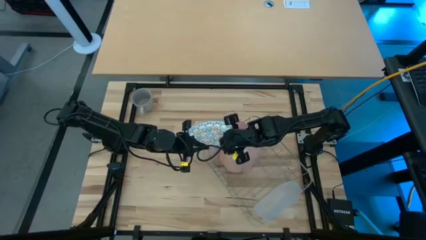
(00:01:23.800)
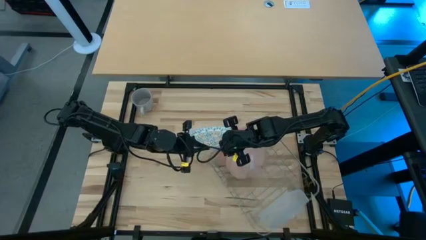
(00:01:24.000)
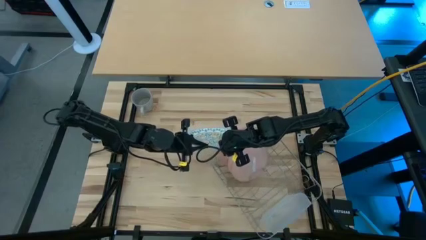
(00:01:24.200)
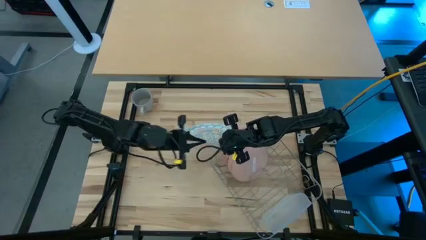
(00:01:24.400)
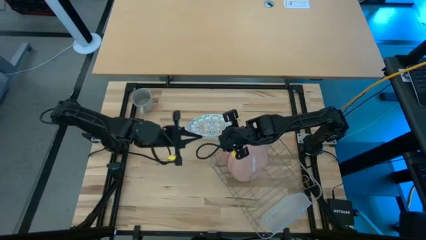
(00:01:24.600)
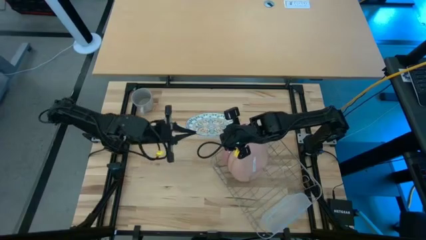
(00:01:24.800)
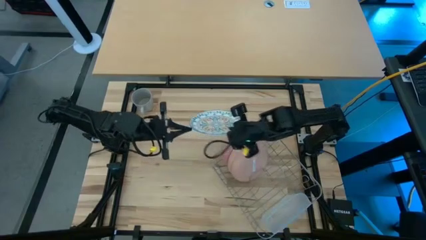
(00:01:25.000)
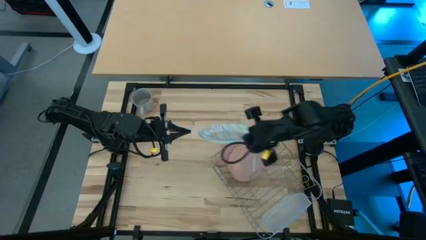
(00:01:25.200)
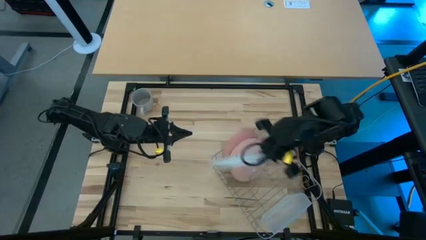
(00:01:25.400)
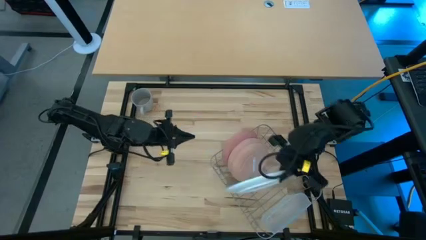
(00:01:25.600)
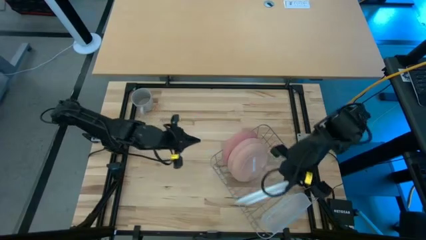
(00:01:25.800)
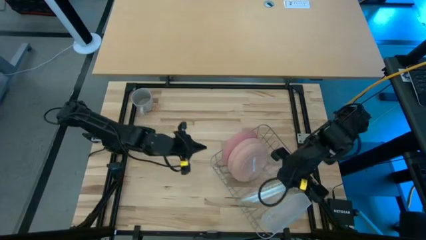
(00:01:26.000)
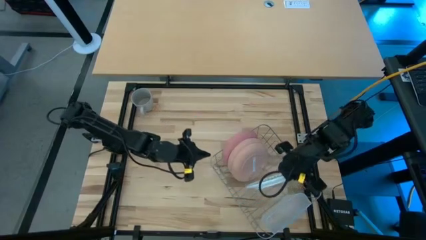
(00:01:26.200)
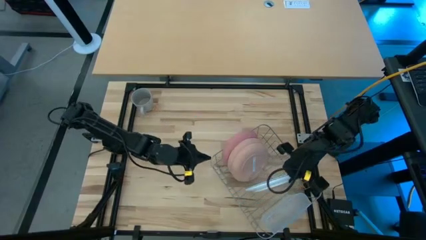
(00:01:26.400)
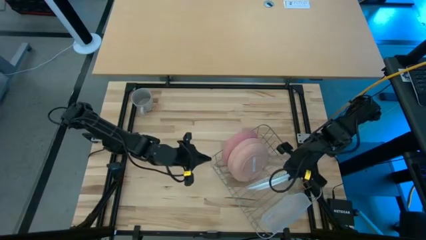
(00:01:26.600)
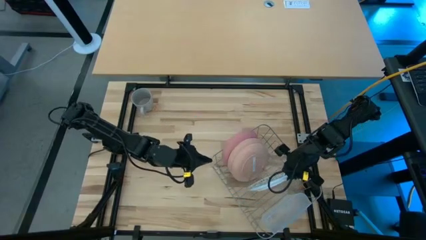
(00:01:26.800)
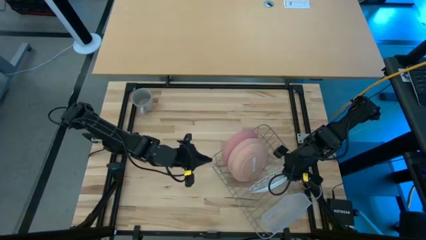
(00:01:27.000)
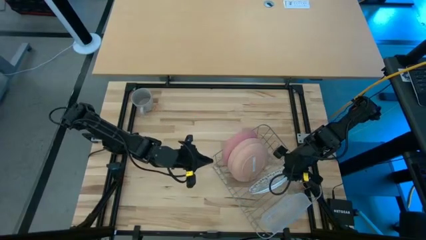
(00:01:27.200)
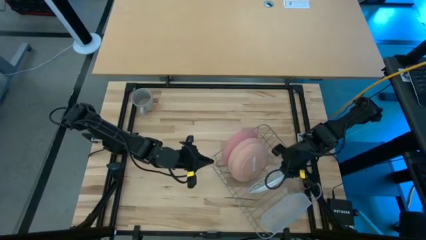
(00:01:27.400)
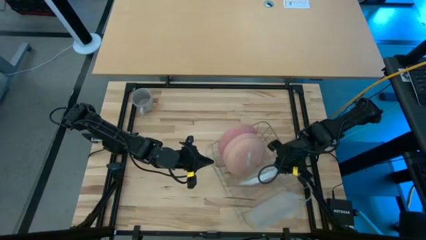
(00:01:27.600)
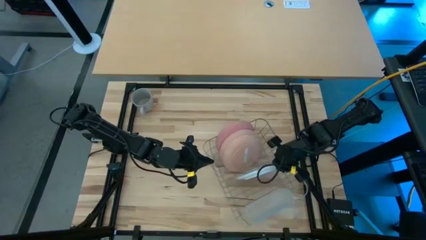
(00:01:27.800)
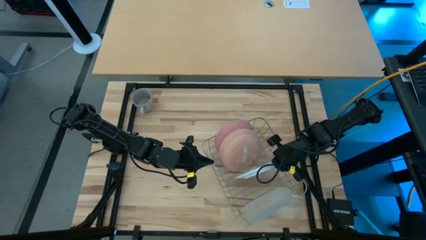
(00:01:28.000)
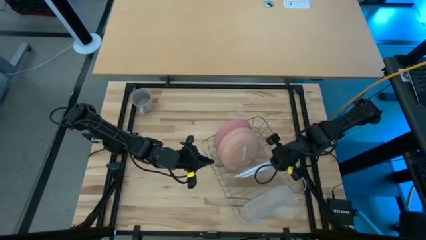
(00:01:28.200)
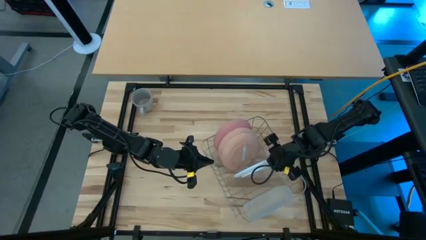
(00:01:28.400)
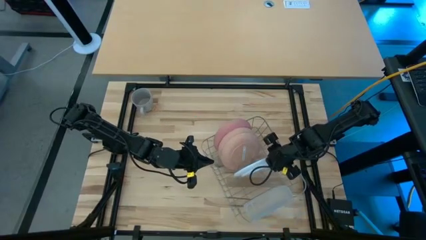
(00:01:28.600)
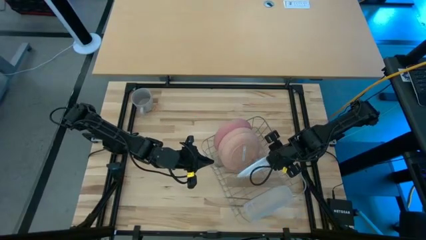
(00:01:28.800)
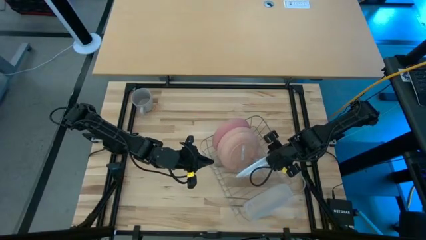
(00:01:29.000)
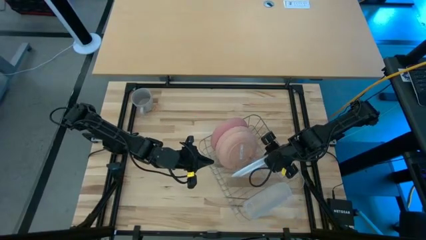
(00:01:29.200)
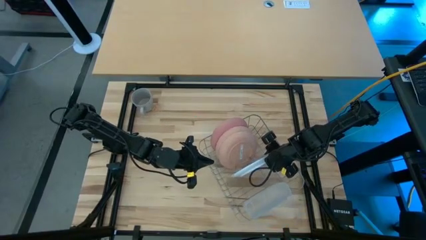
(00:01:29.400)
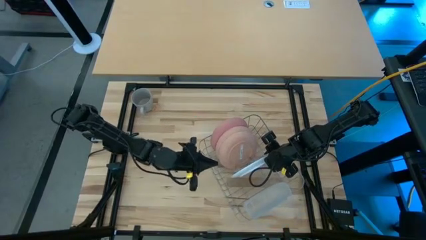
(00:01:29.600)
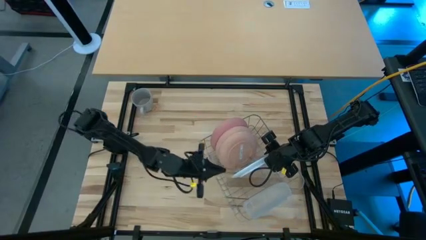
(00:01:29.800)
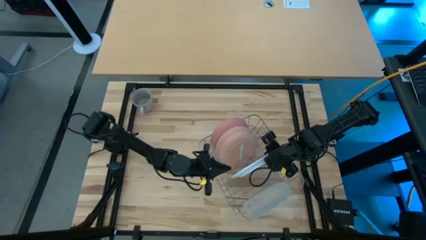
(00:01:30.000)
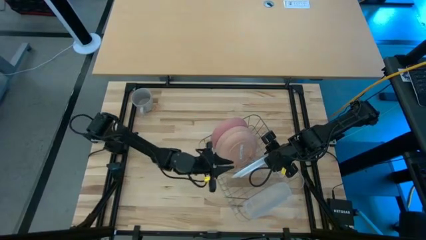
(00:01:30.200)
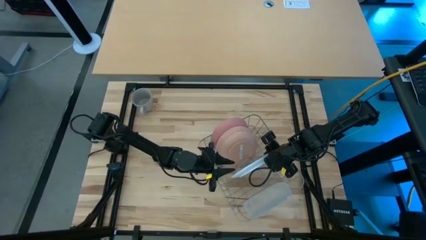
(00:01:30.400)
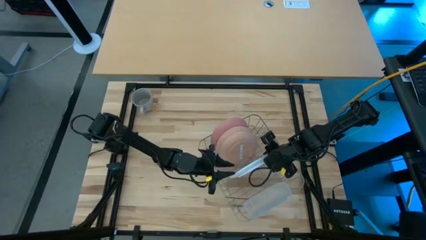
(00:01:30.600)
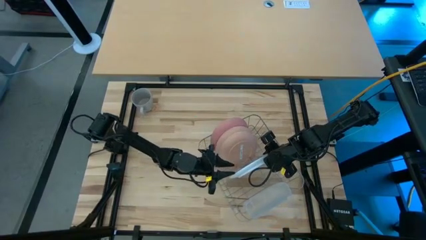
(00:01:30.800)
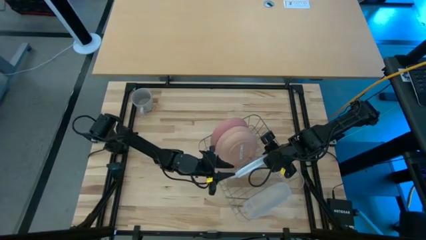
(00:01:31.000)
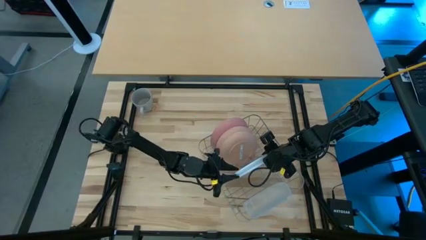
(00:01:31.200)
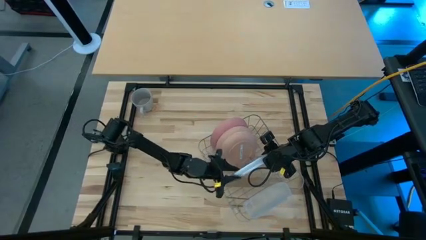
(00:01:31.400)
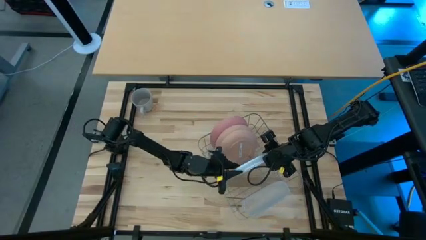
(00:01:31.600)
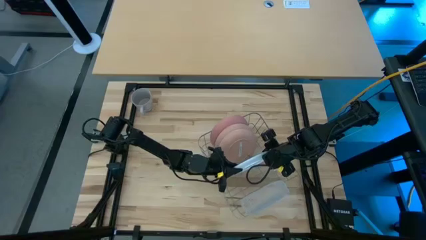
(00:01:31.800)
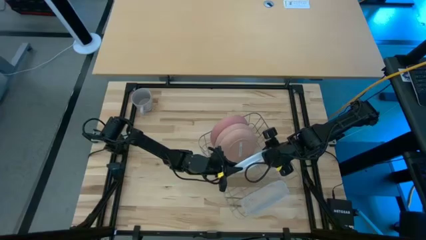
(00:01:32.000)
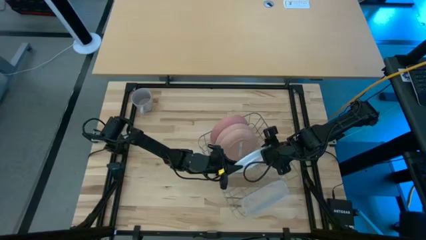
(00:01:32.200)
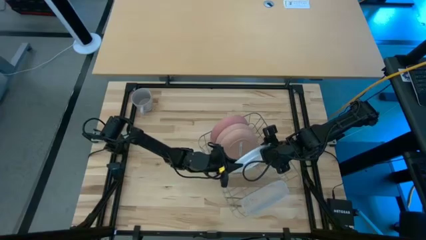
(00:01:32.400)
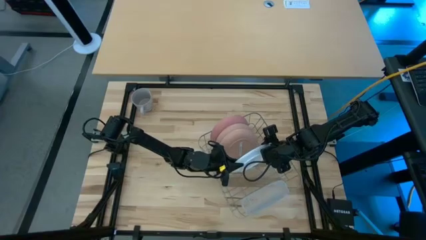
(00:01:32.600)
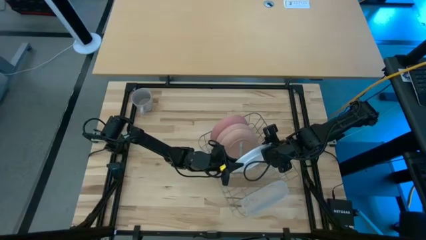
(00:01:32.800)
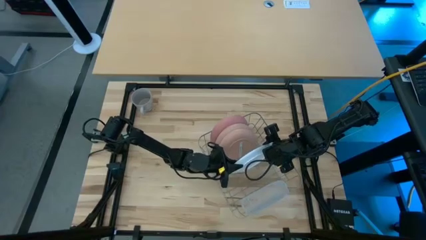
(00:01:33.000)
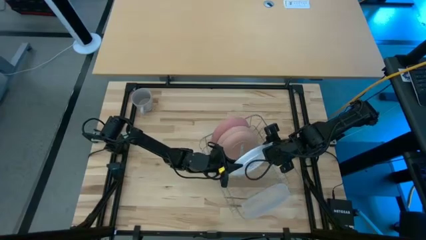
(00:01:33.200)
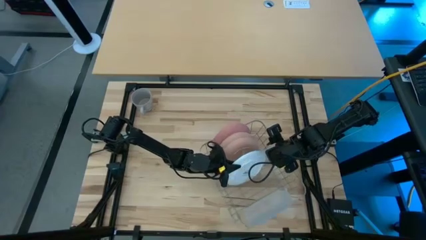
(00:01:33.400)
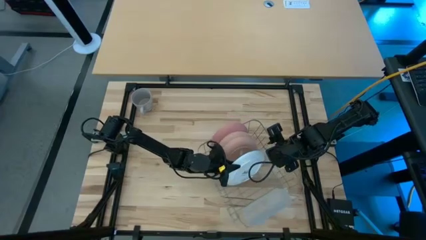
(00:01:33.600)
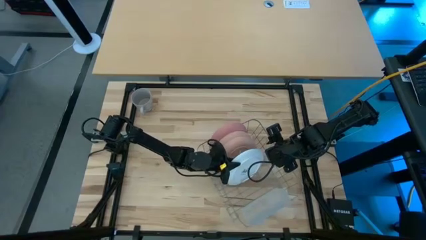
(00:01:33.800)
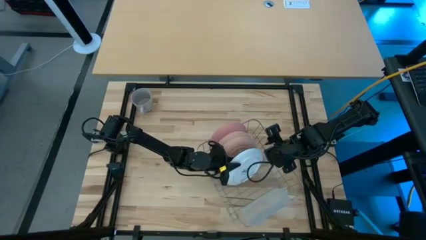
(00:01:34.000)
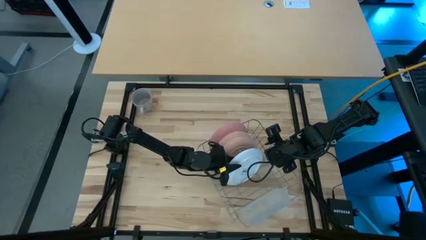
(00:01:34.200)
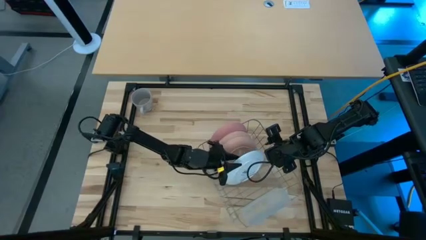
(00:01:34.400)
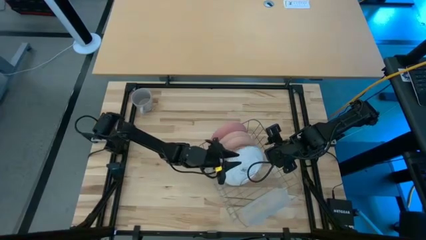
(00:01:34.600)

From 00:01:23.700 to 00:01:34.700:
Task: Sort dishes
Put the white plate into the dish rack

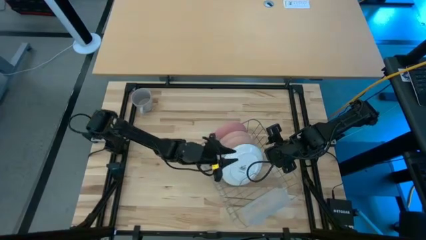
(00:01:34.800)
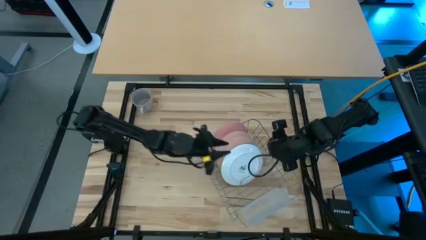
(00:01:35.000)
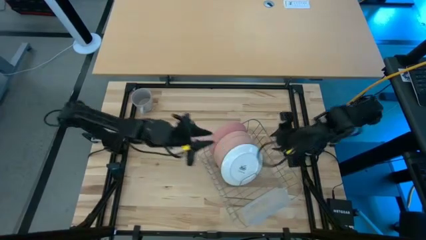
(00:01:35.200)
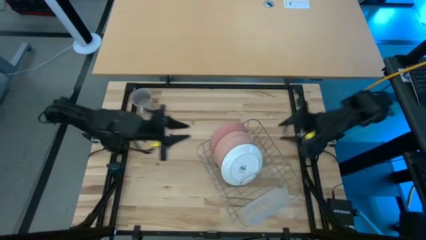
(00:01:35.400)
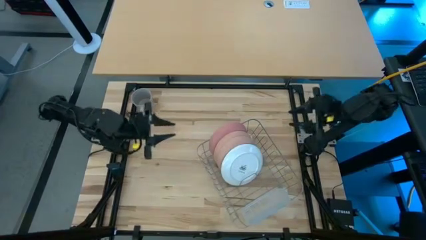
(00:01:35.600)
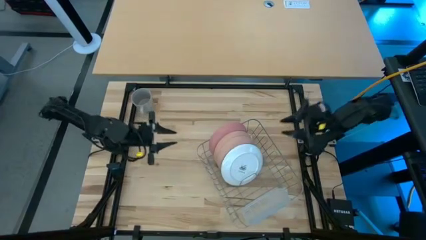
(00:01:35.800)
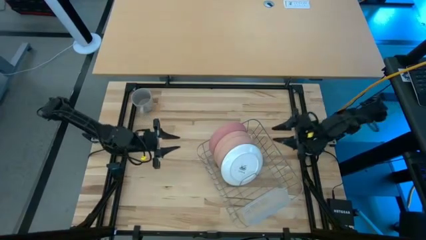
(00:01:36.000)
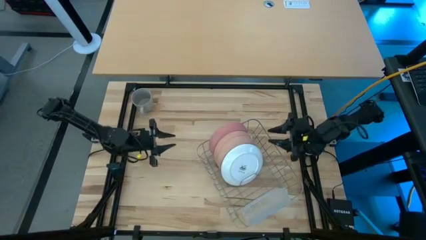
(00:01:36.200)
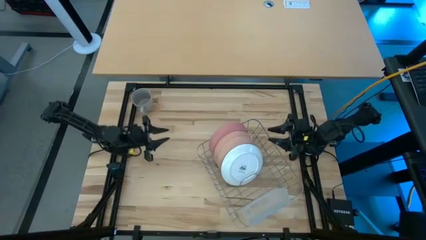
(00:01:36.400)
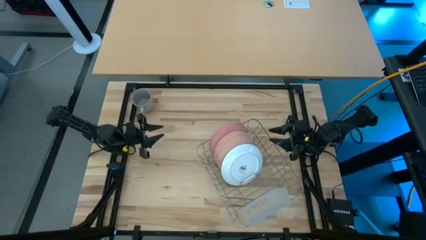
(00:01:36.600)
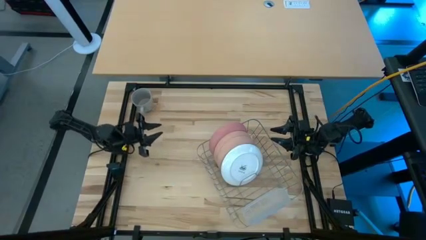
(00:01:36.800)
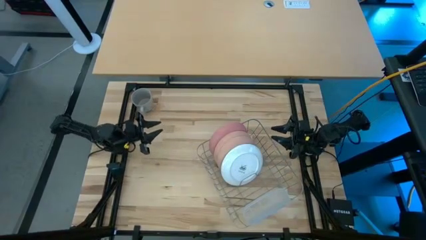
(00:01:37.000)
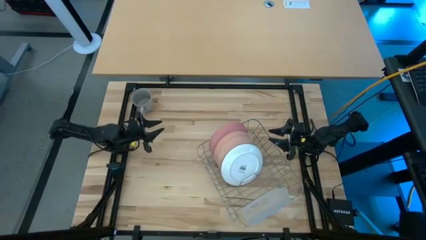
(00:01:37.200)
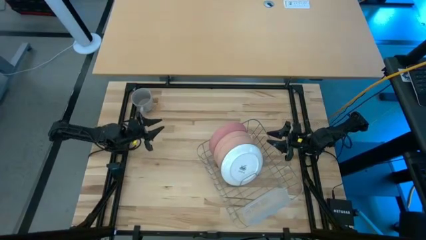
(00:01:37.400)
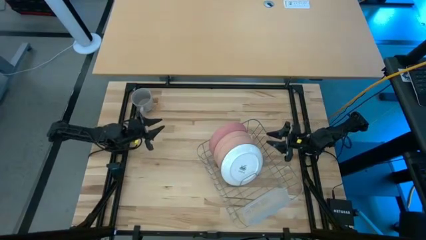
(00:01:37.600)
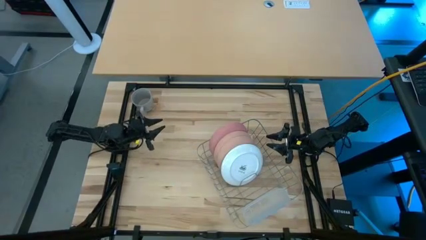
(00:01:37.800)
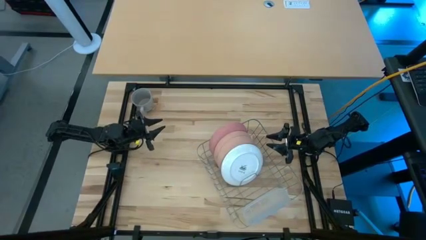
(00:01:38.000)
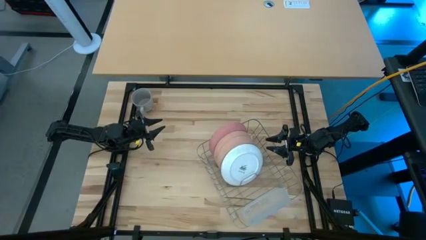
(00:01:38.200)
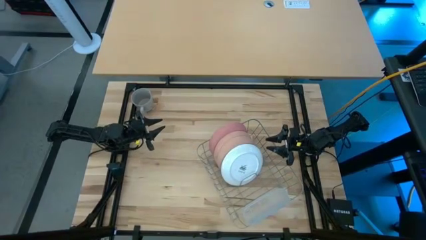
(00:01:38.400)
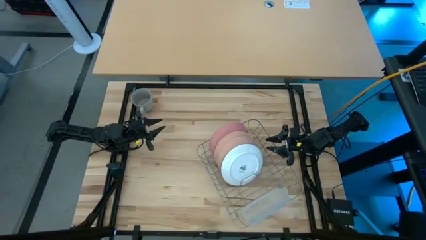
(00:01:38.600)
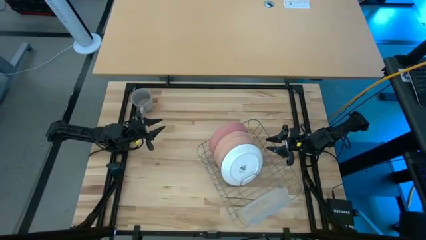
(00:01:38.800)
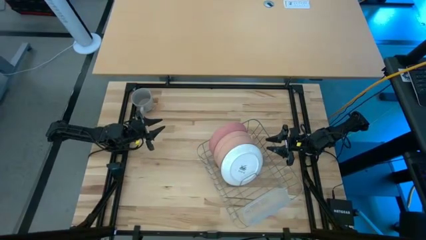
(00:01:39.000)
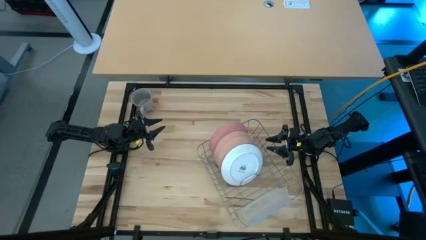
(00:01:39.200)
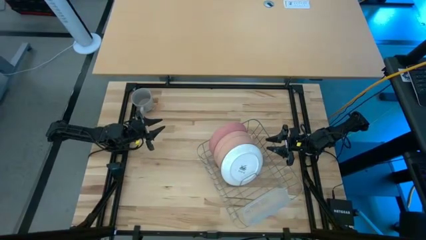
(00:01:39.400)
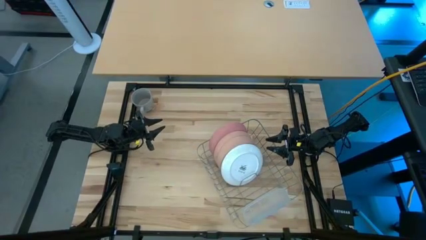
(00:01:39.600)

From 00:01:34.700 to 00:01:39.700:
Return to Home Position
